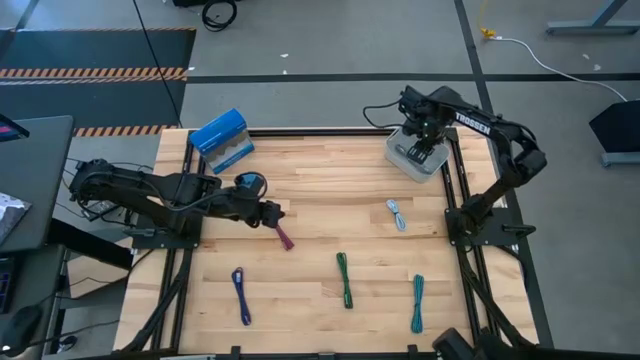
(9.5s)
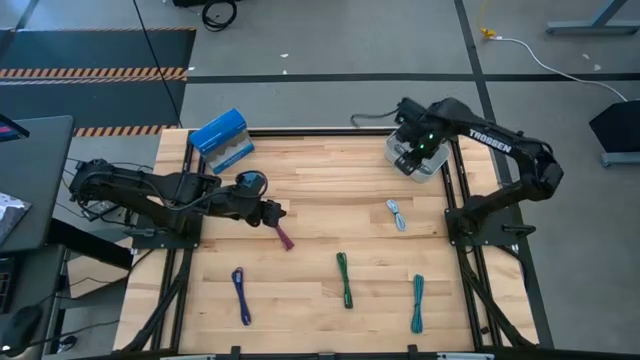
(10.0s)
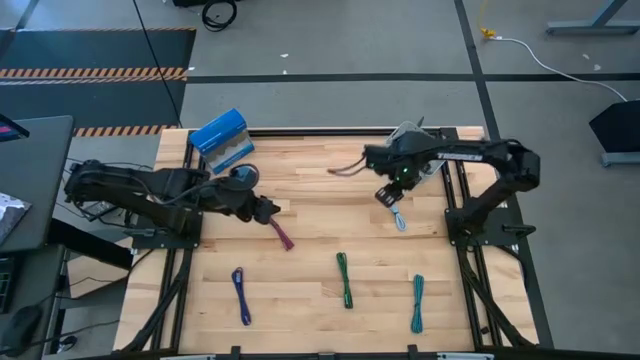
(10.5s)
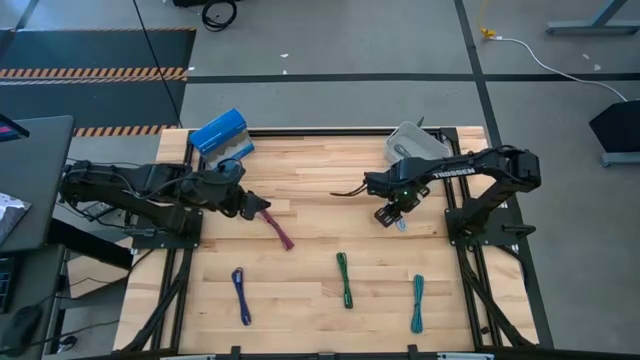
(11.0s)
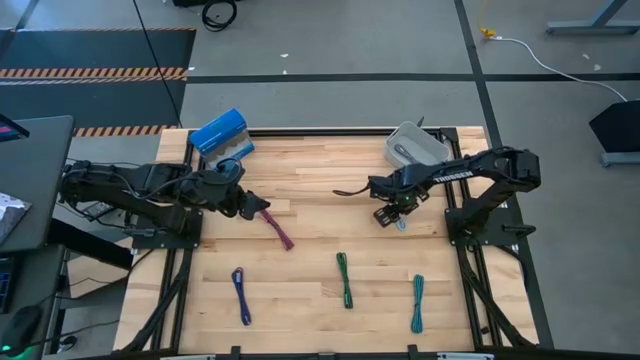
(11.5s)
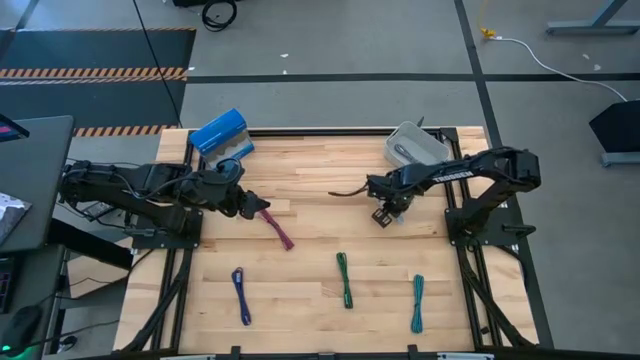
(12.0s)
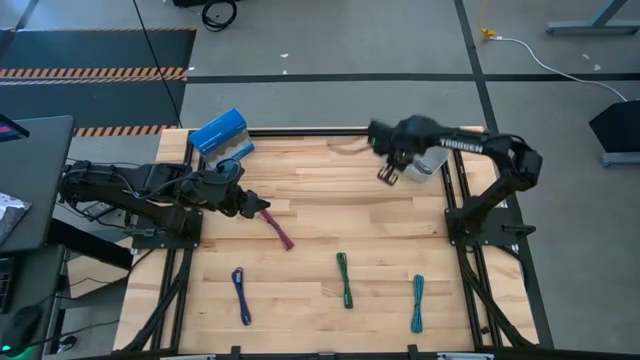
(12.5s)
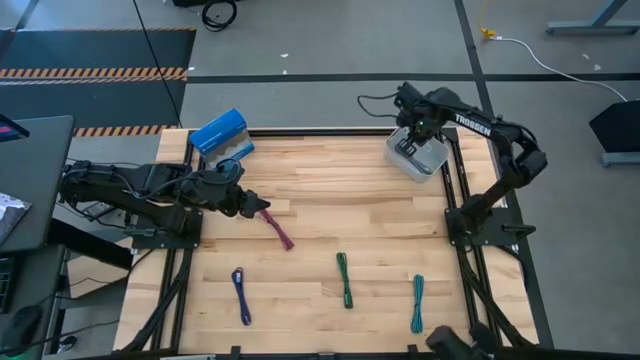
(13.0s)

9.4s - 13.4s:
Task: Pick and place USB-C Cables
Put the ziptied light blue charger cable into the bin

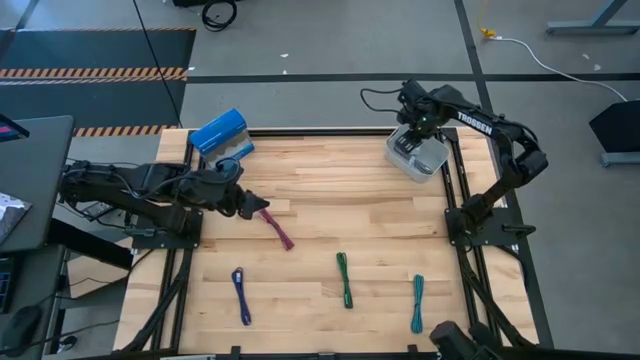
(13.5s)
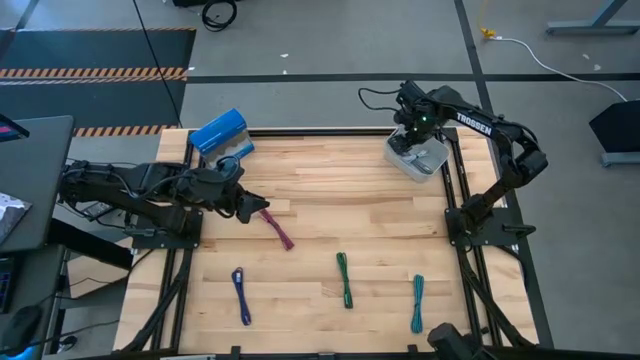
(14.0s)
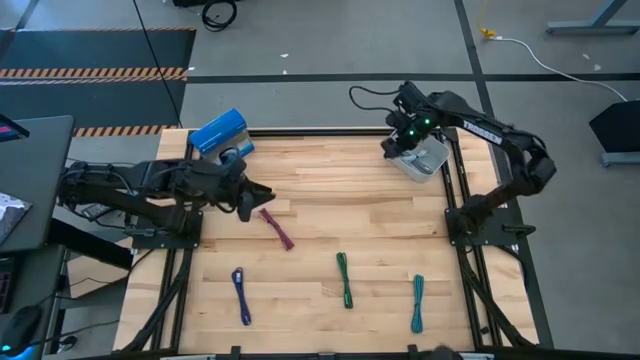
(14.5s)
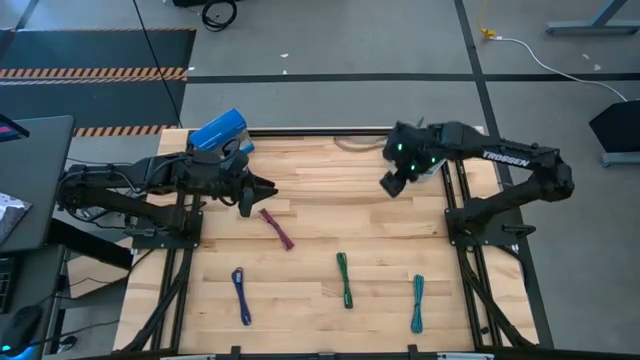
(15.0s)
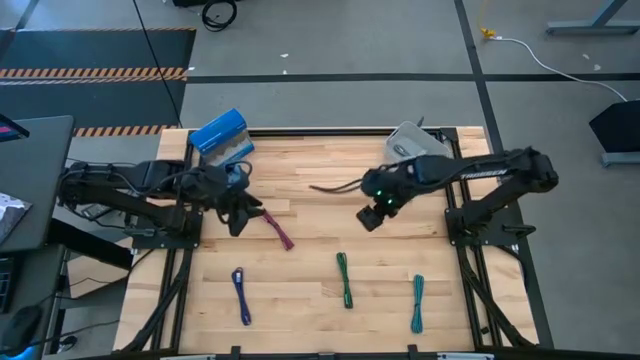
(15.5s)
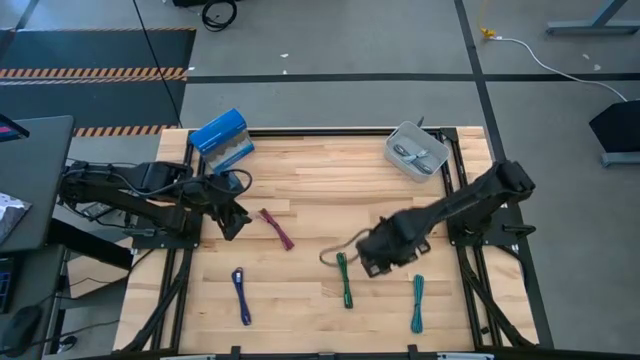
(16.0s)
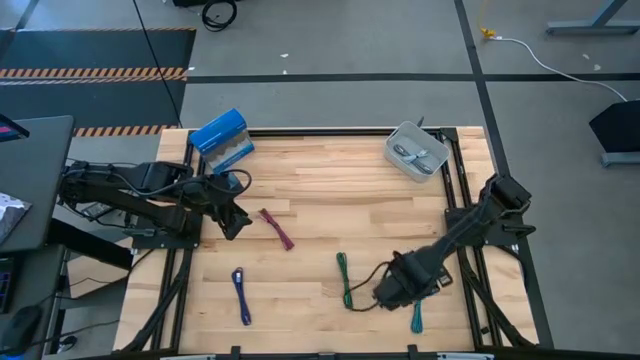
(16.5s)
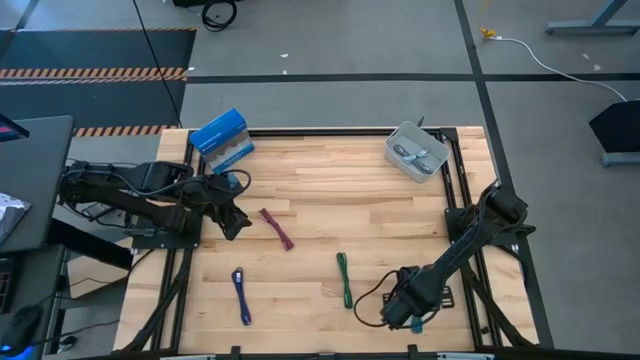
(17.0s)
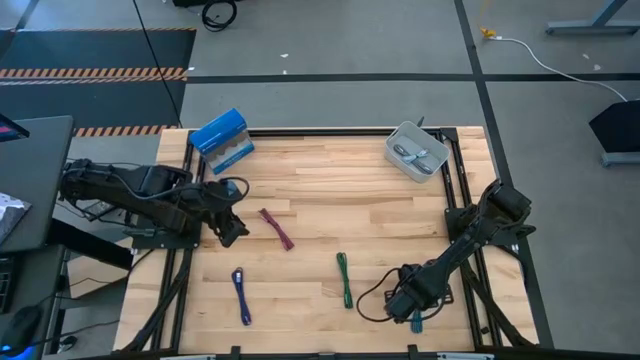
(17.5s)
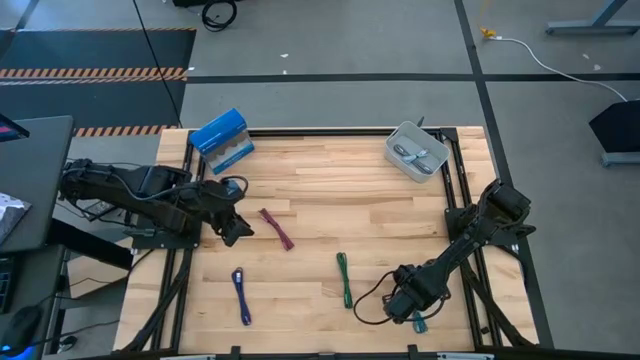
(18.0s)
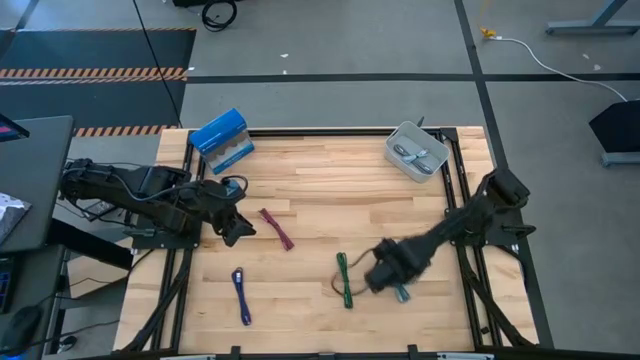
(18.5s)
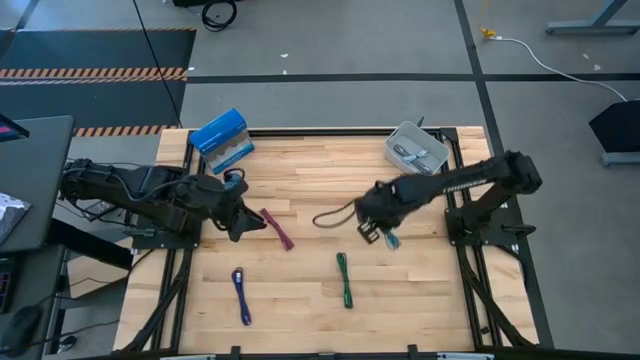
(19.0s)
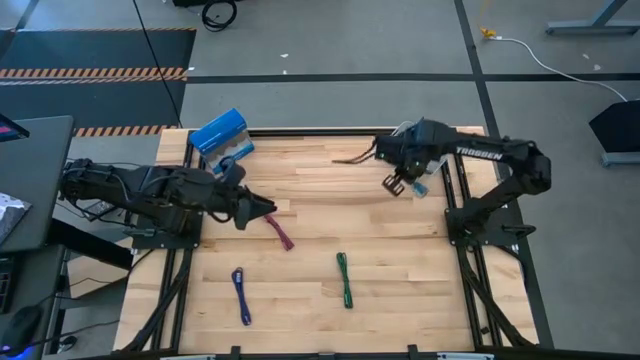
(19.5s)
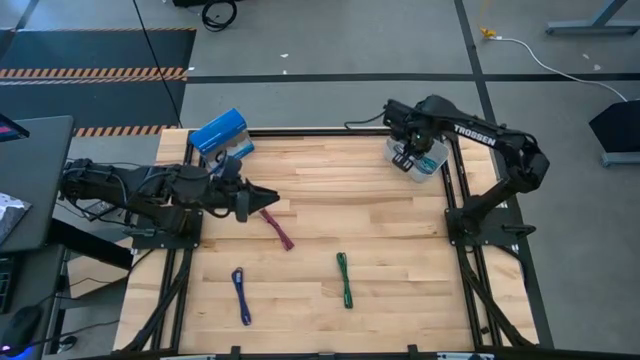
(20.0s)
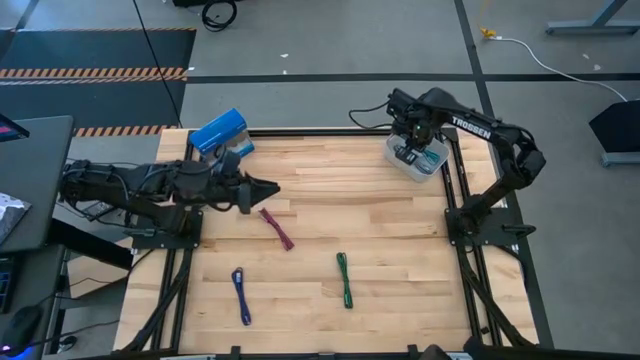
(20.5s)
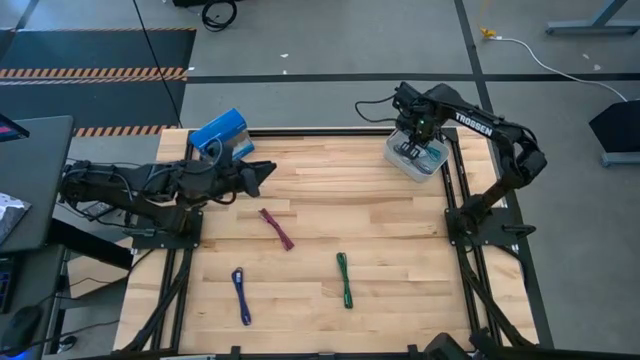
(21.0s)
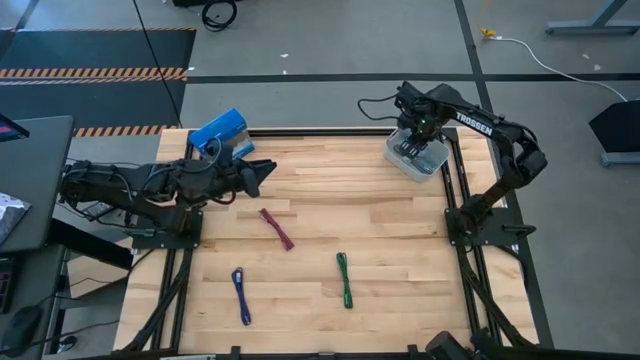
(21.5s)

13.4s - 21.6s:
Put the ziptied blue USB charger cable into the bin

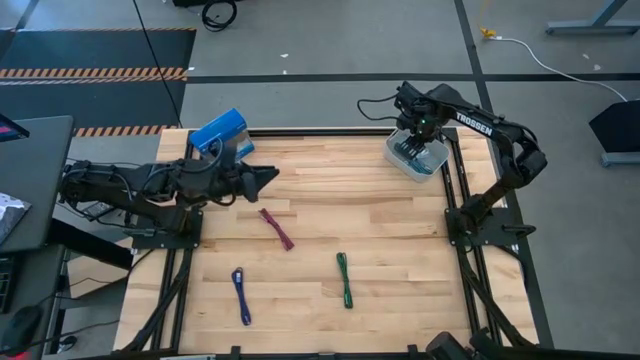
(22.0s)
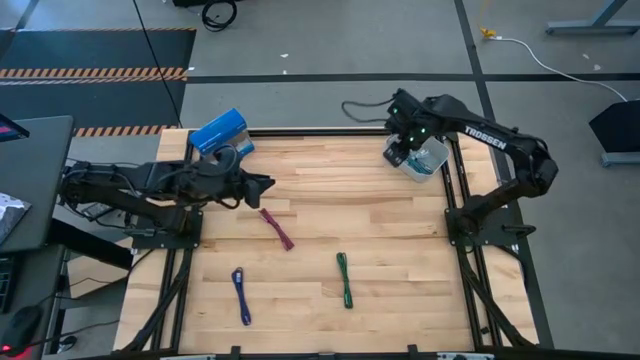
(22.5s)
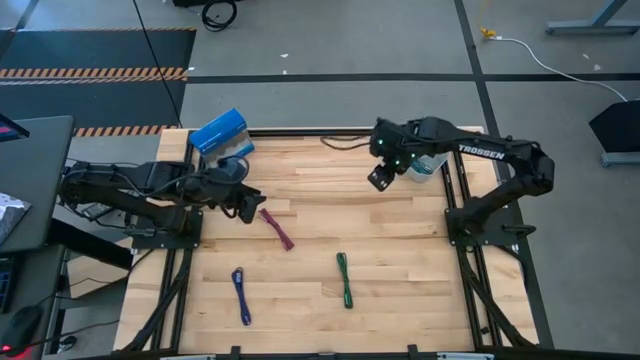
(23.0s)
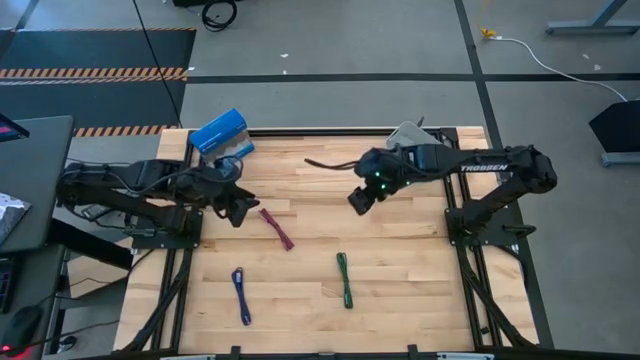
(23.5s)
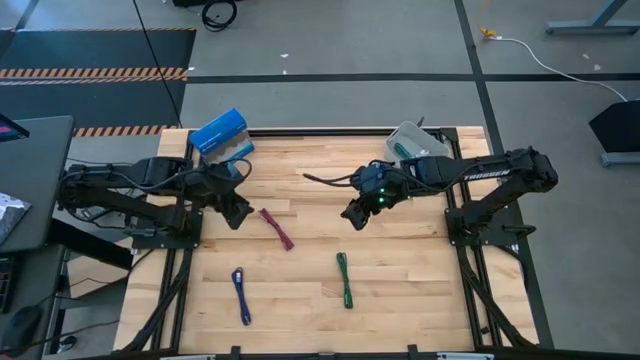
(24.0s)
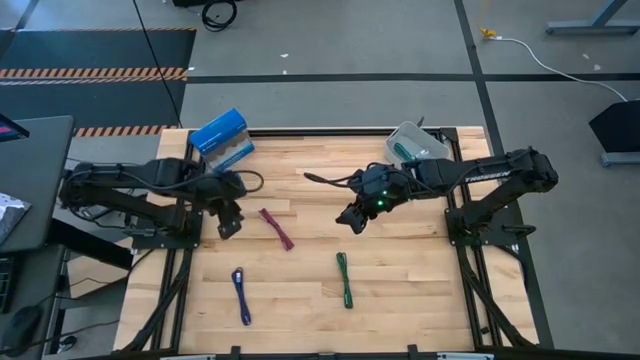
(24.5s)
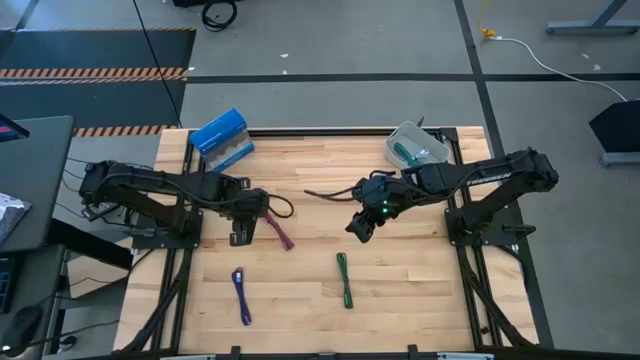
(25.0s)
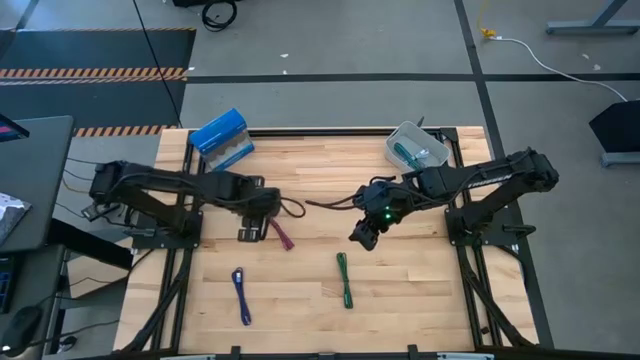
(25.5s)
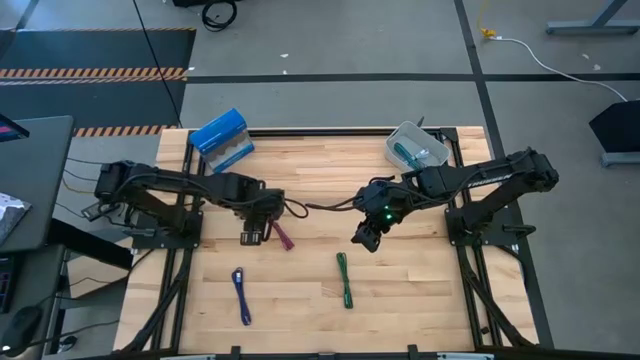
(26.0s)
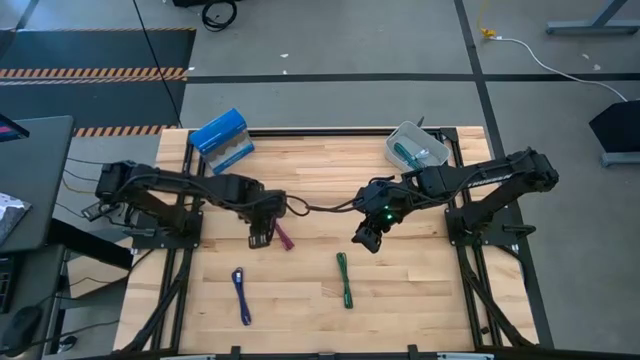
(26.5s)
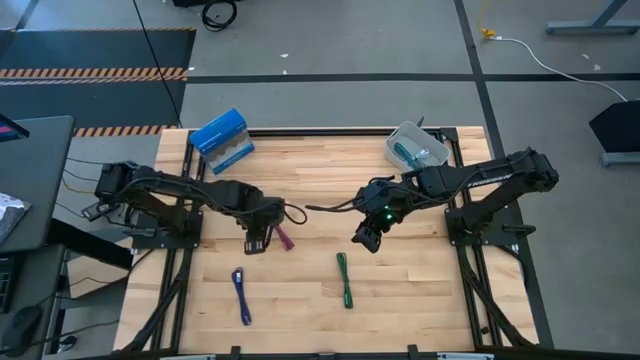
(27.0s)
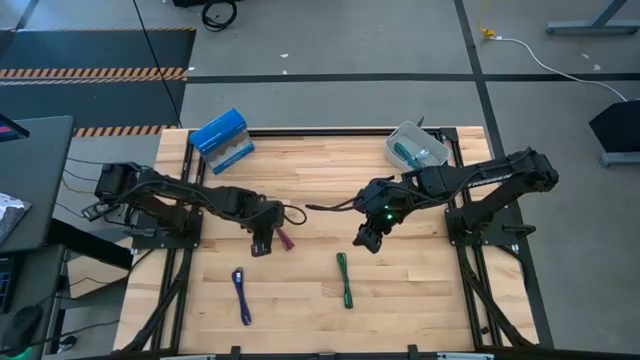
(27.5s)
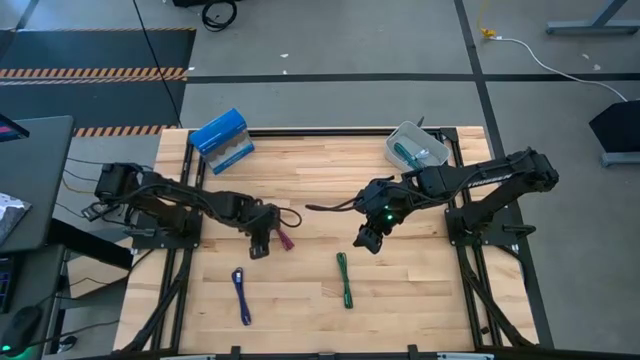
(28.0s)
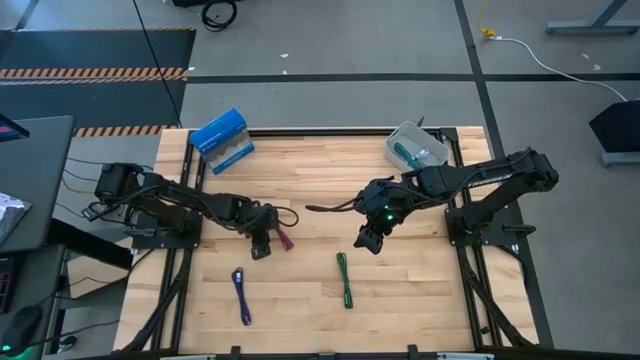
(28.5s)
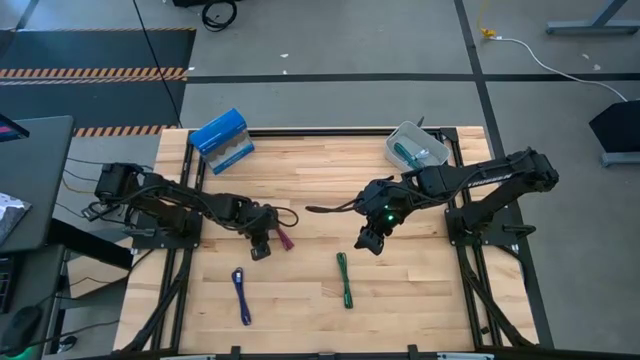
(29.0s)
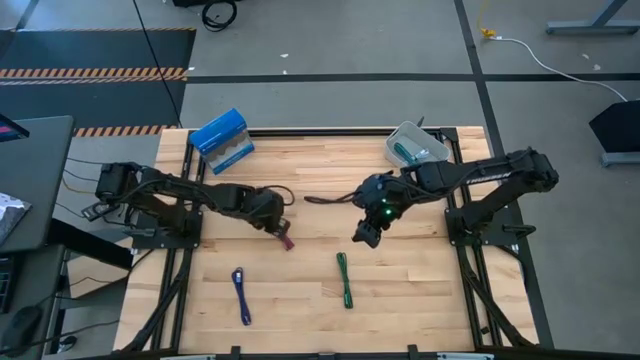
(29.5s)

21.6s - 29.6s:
Put the ziptied light red USB charger cable into the bin

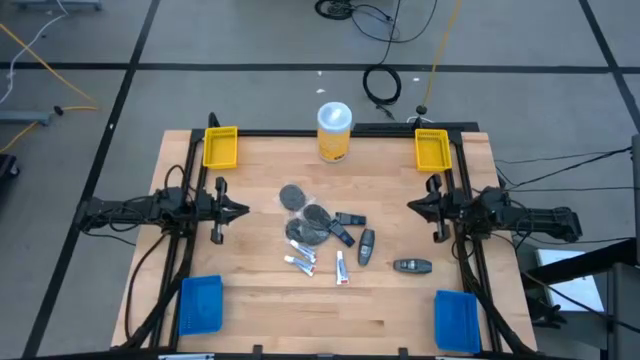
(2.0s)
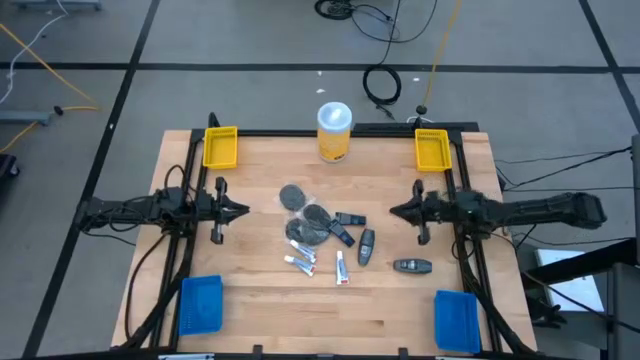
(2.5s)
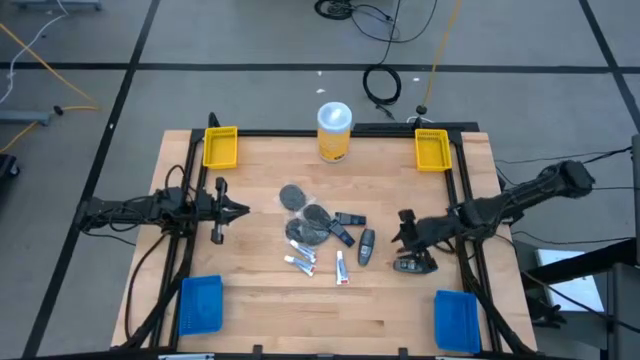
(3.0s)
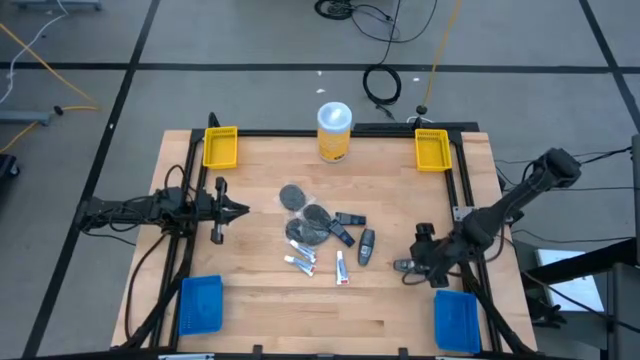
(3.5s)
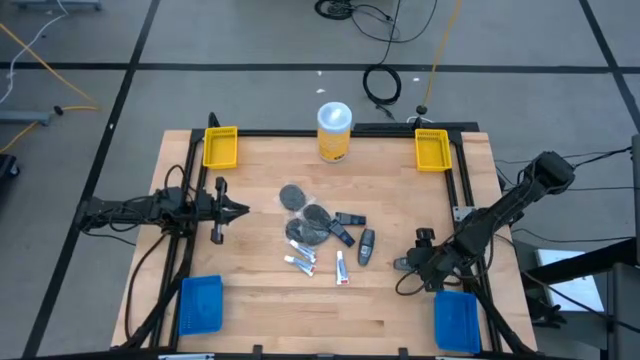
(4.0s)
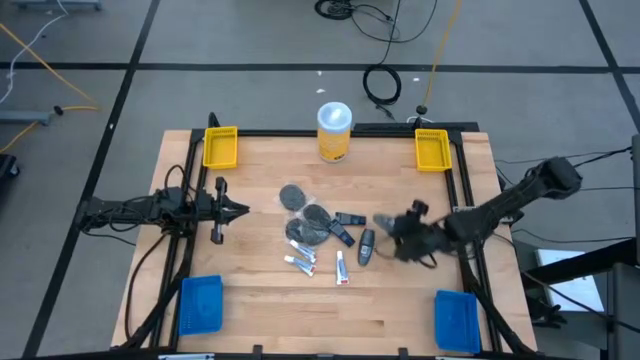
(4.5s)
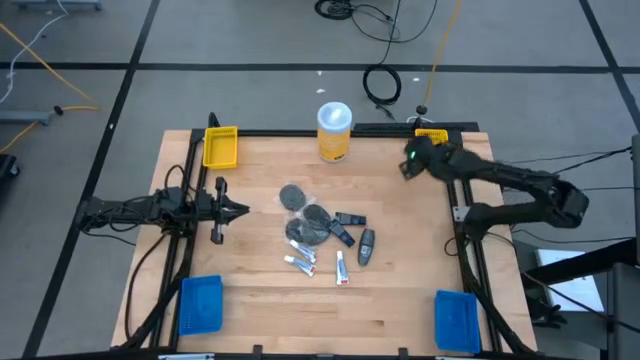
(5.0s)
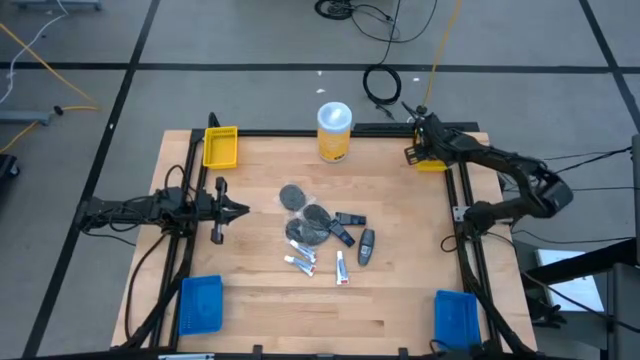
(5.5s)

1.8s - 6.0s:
Task: Pick & Place Travel size toiletries
Put the left gray deodorant into the right yellow bin
